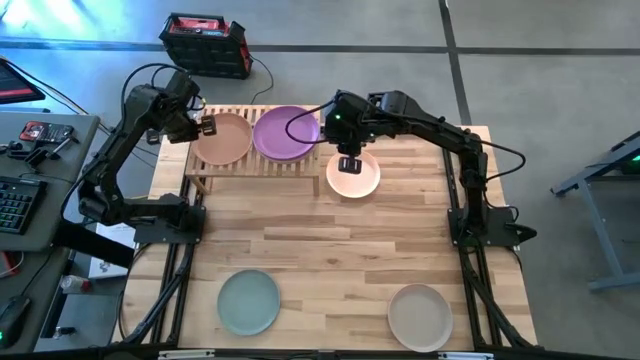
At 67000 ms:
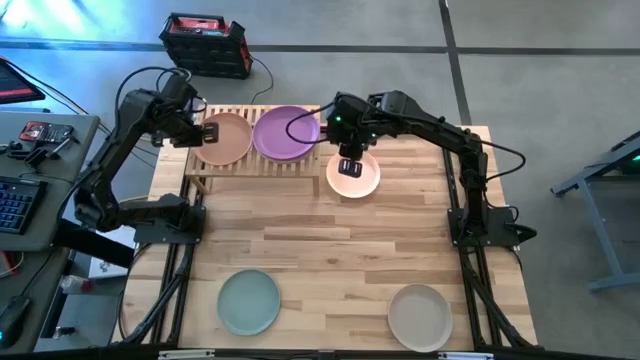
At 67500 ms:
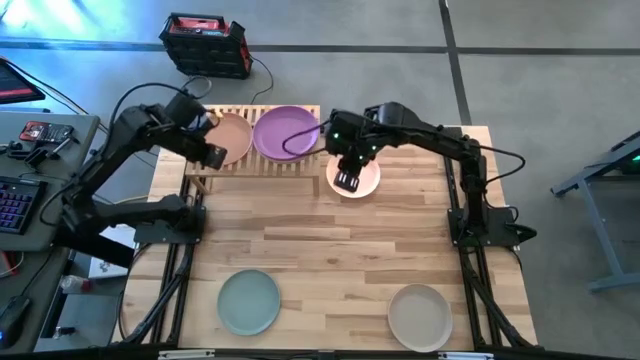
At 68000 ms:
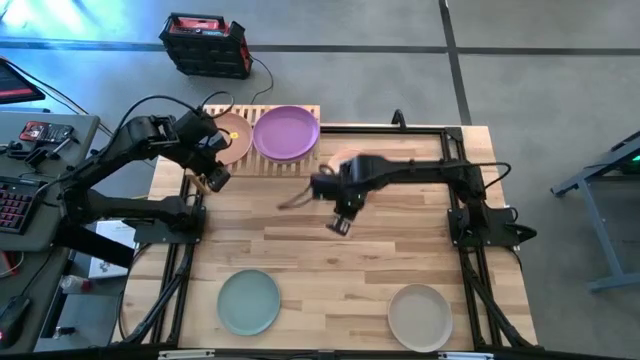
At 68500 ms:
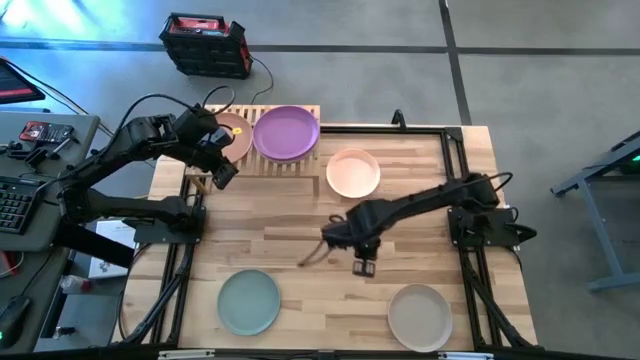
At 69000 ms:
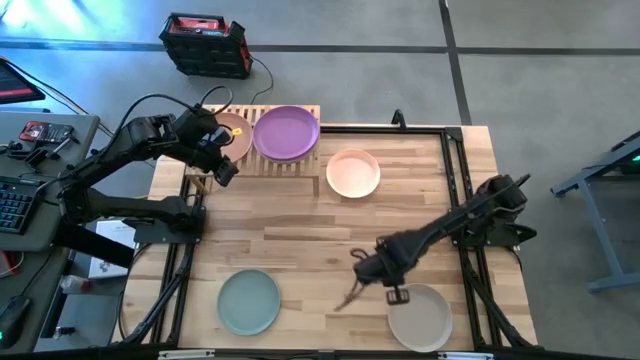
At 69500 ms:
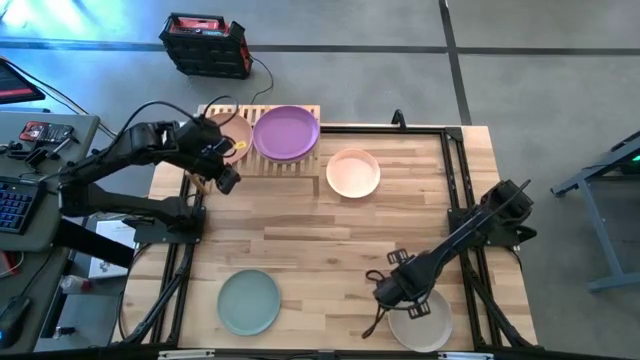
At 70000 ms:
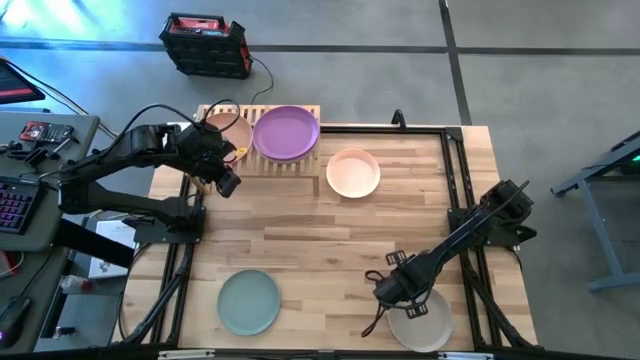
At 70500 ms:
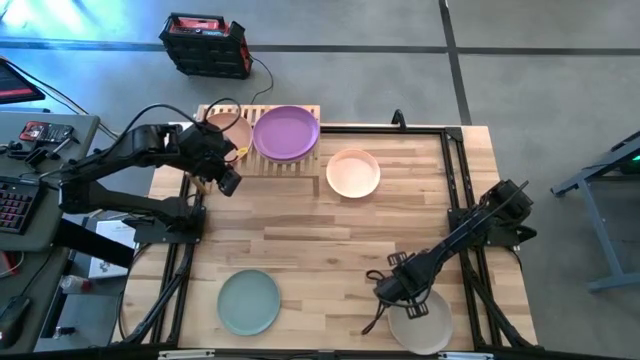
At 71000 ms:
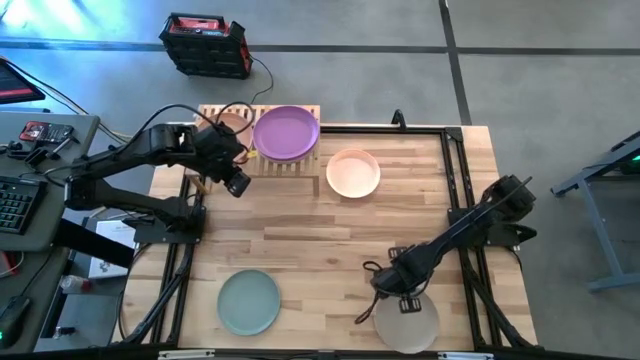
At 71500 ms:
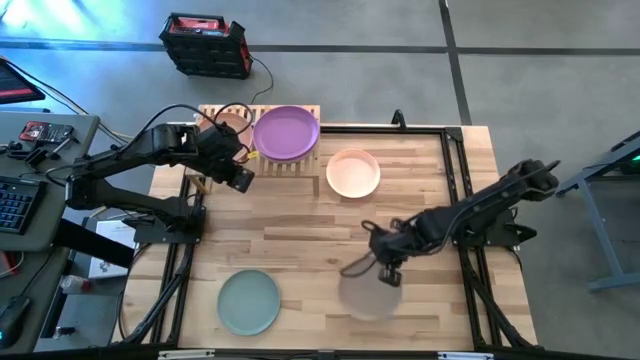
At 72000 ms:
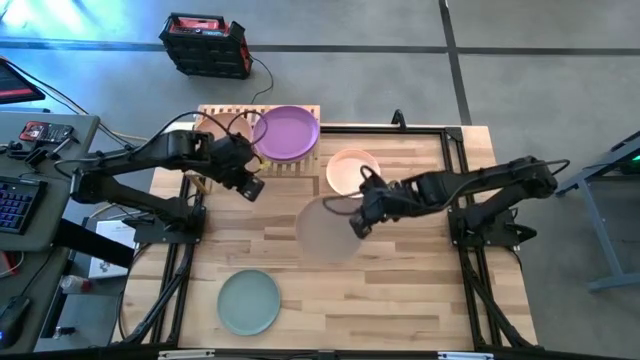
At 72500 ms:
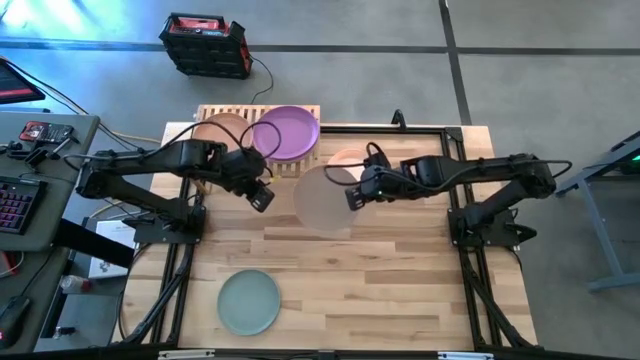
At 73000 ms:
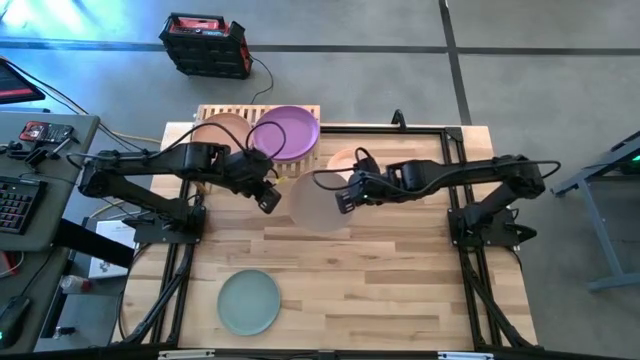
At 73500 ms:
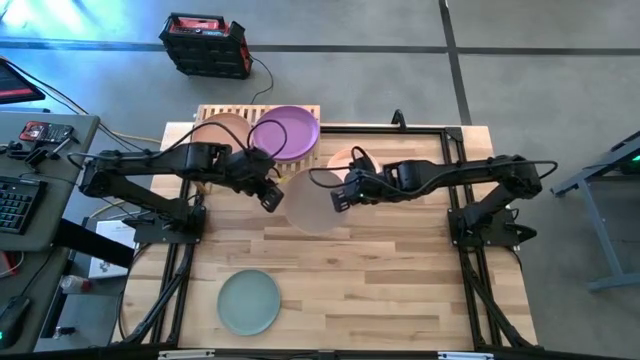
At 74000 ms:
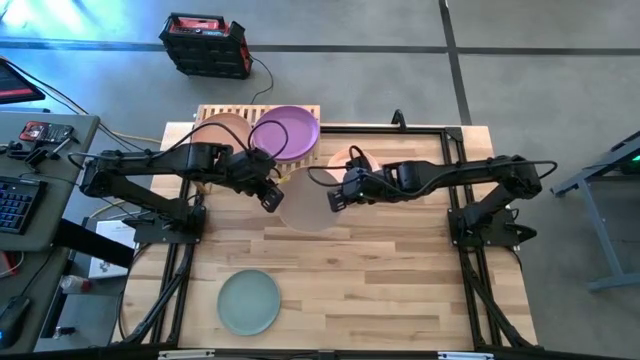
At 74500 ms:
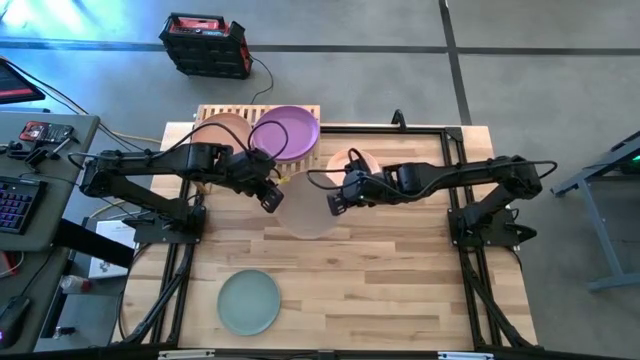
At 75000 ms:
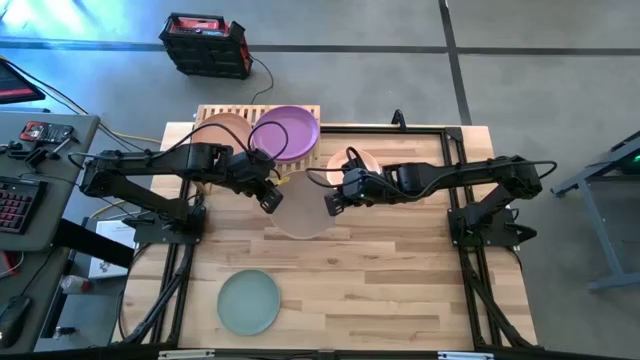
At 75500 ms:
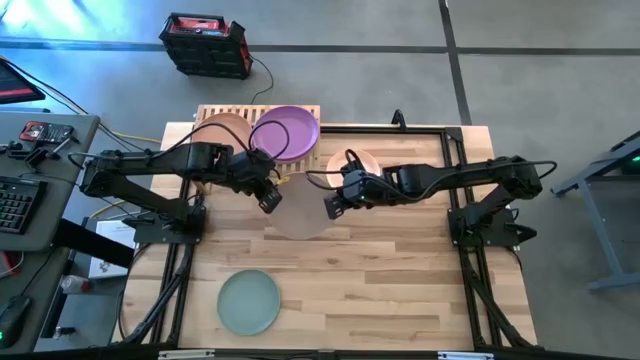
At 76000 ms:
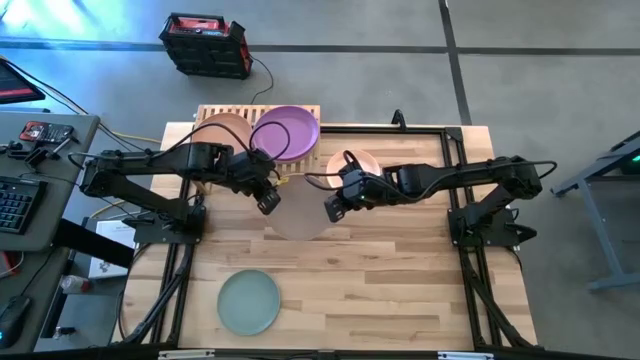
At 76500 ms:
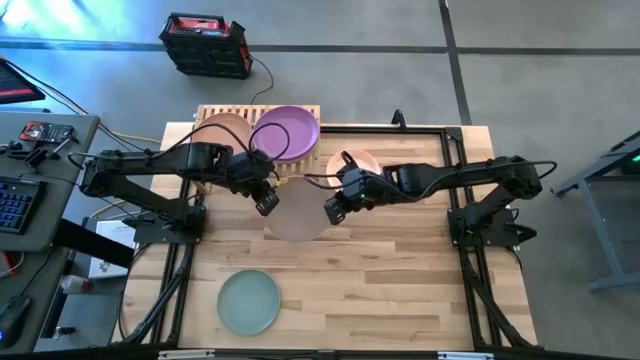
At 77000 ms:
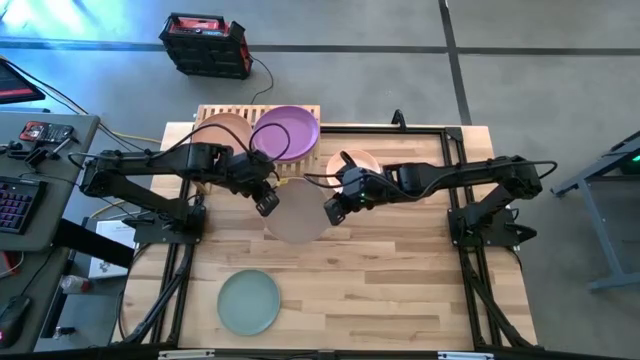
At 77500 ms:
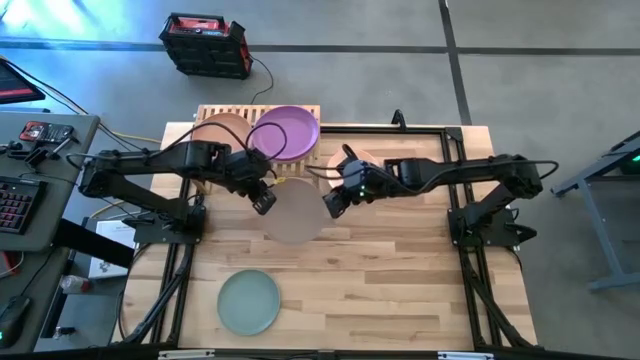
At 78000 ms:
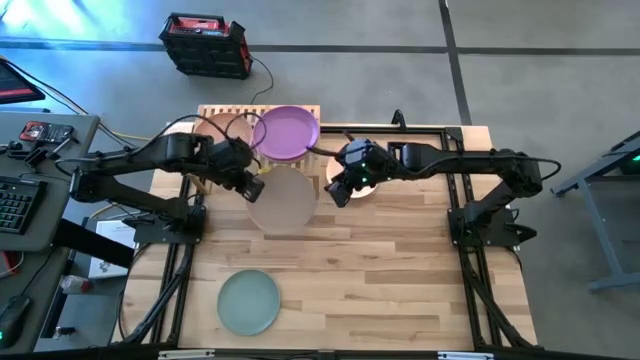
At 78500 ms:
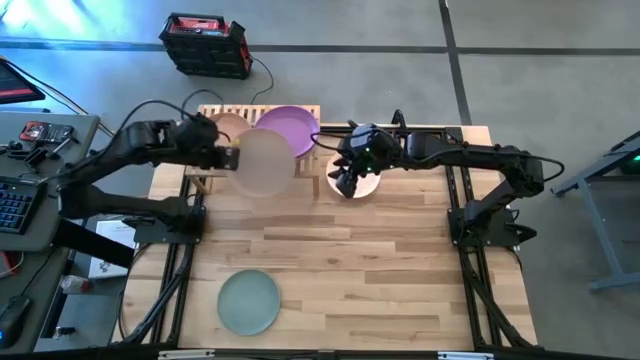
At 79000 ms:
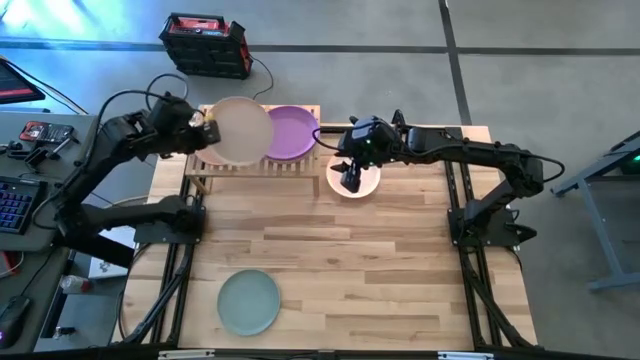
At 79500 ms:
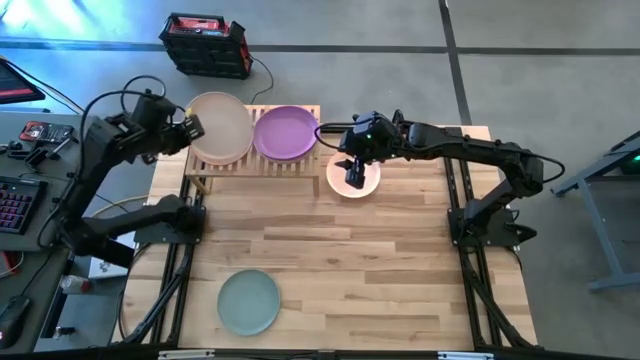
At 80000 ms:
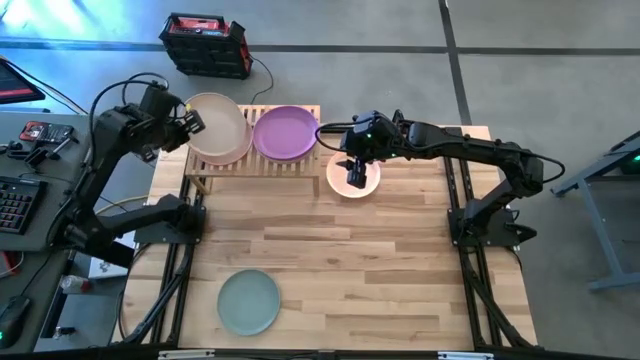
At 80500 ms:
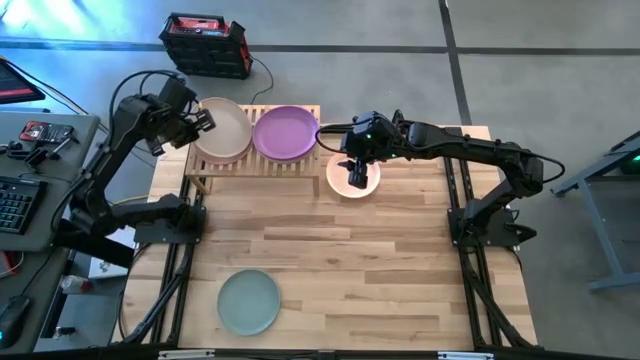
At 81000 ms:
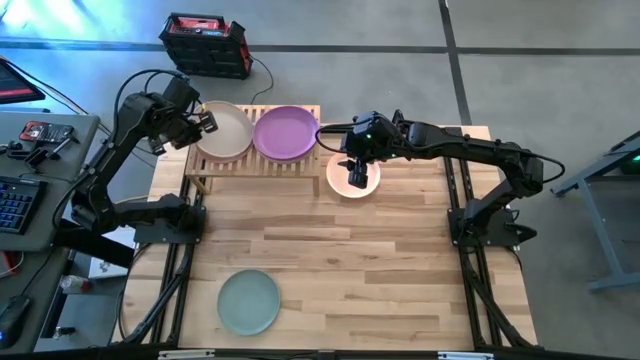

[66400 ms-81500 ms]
Task: Place and stack plates onto a shelf
Stack the gray plate on top of the dark brown plate on the shelf

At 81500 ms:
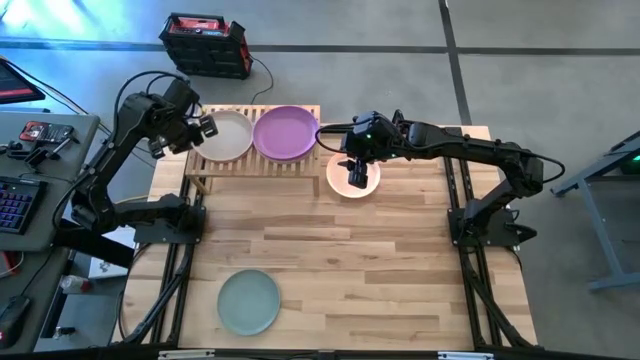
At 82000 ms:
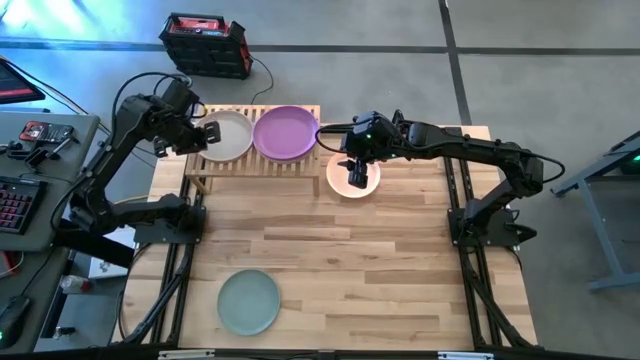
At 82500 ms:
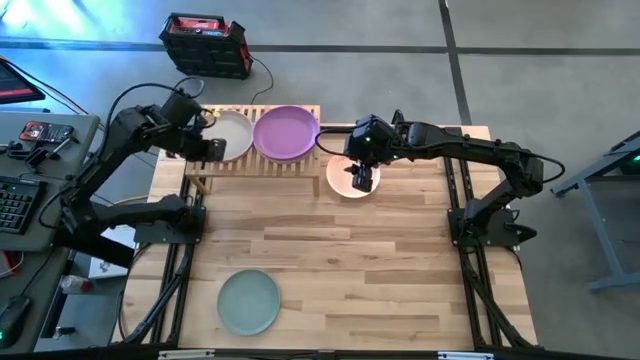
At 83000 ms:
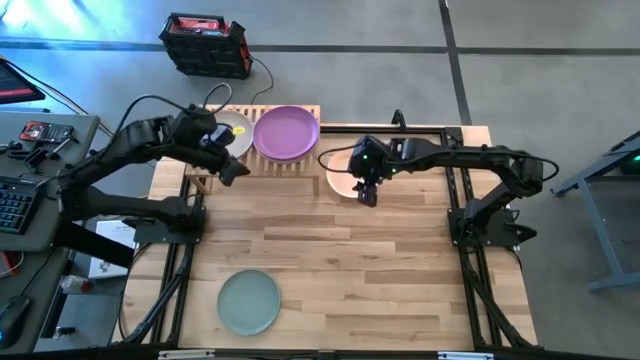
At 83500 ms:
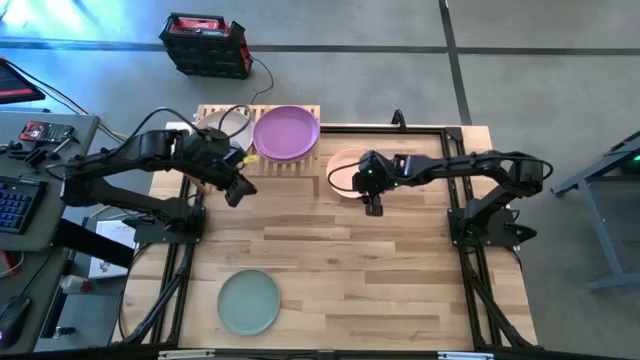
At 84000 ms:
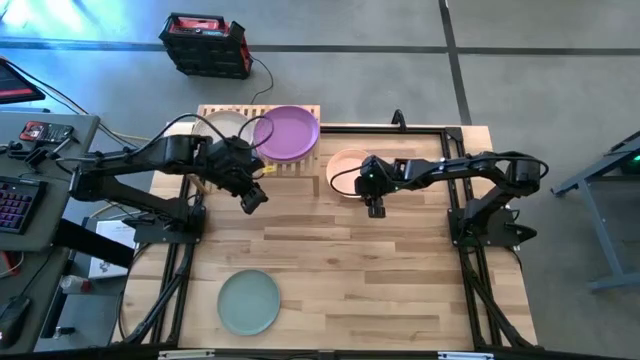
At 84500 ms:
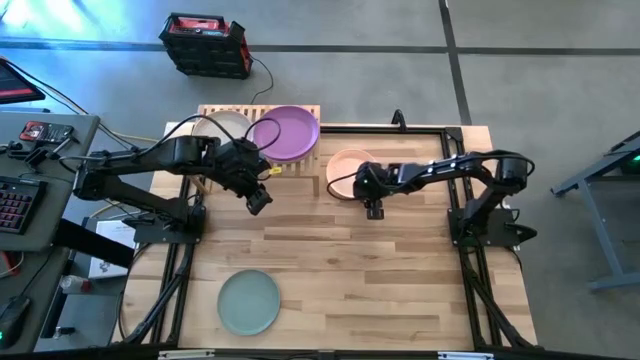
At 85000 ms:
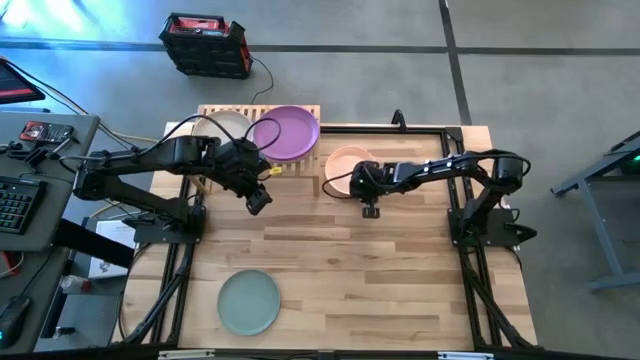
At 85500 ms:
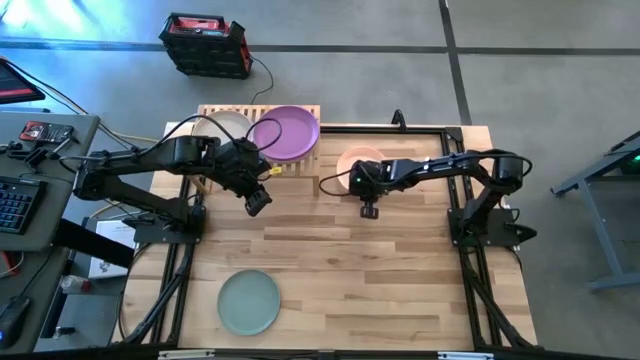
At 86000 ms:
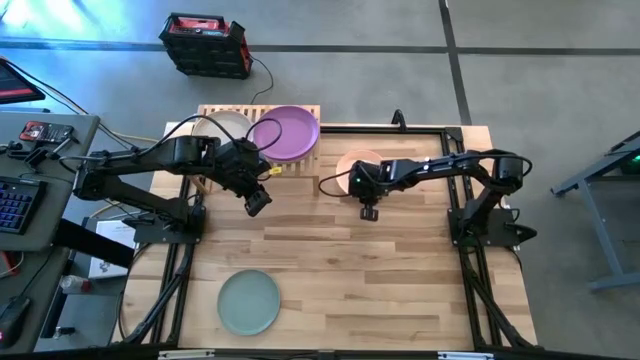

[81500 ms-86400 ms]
Stack the light brown plate on top of the gray plate on the shelf
